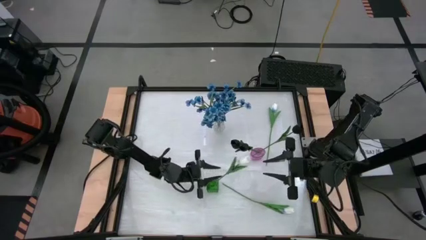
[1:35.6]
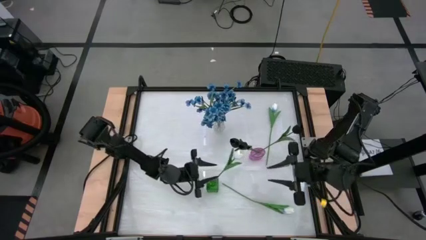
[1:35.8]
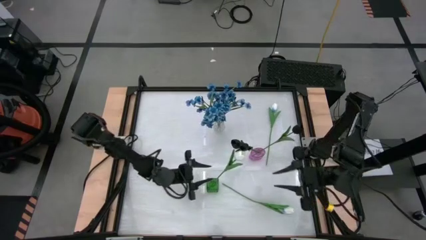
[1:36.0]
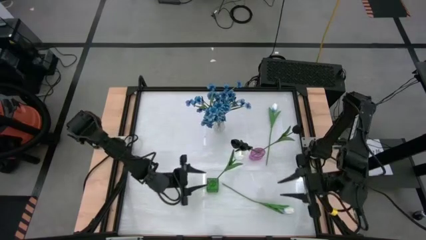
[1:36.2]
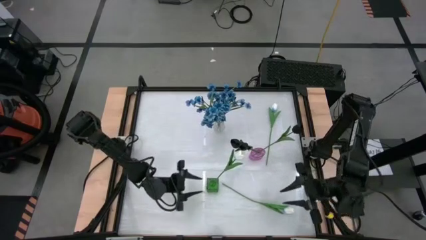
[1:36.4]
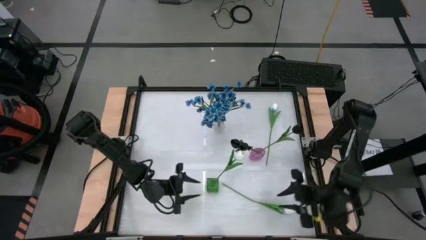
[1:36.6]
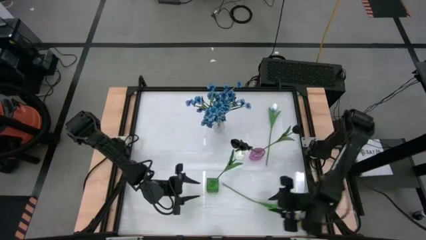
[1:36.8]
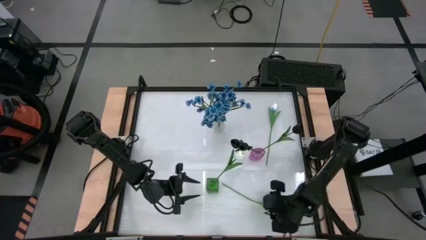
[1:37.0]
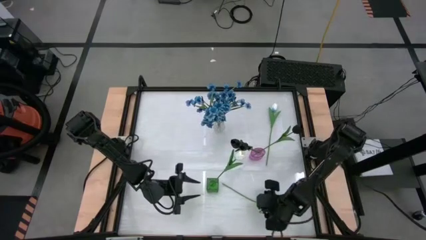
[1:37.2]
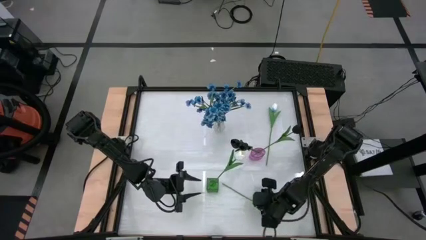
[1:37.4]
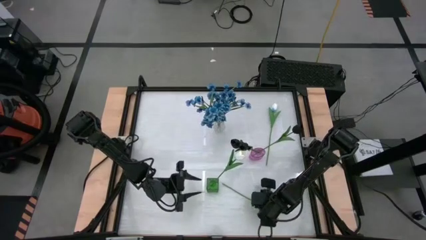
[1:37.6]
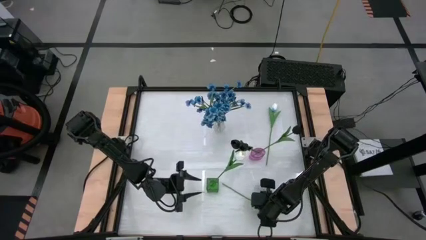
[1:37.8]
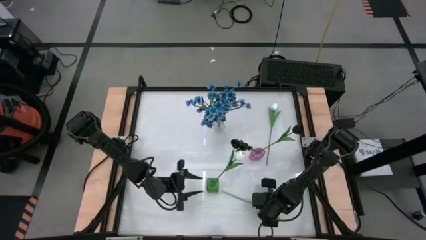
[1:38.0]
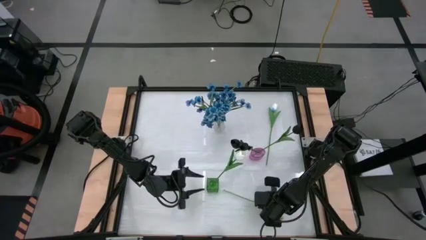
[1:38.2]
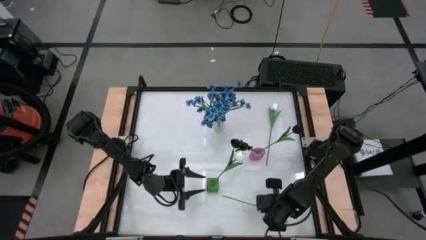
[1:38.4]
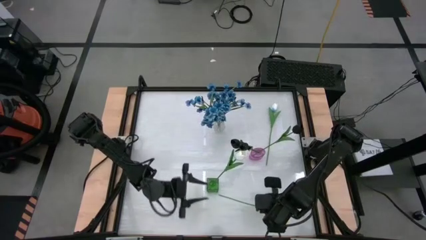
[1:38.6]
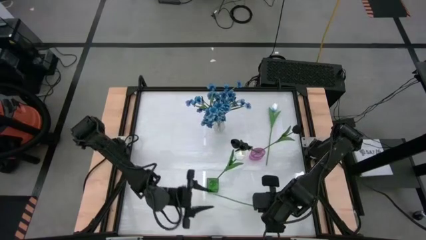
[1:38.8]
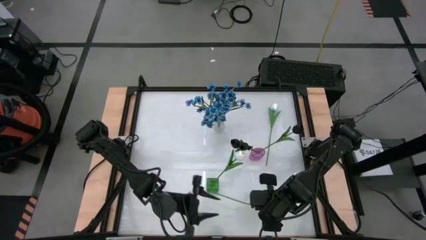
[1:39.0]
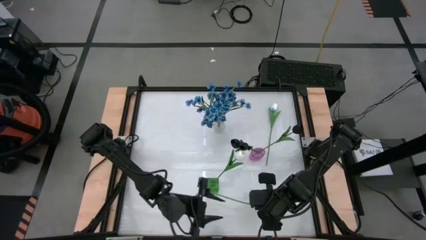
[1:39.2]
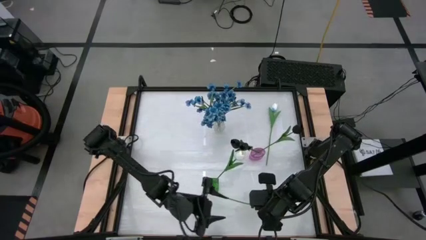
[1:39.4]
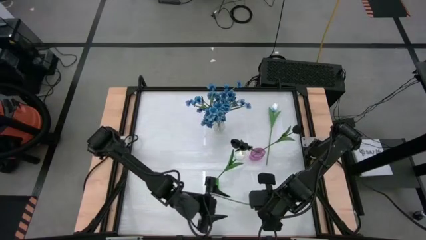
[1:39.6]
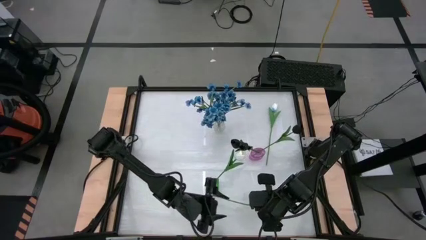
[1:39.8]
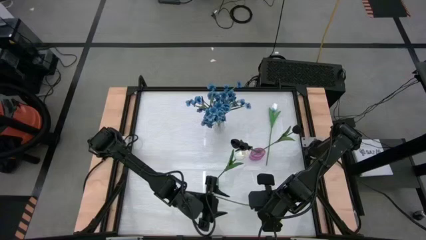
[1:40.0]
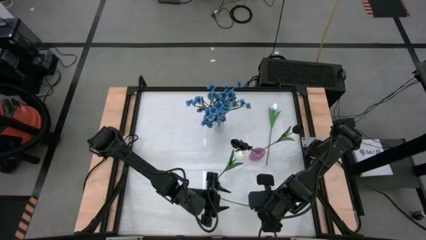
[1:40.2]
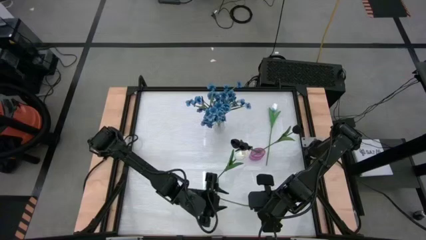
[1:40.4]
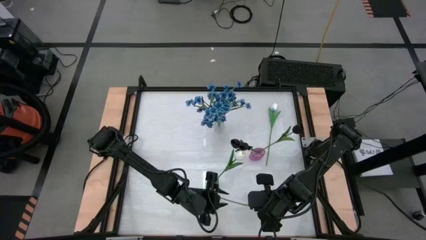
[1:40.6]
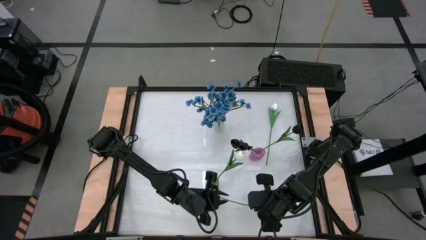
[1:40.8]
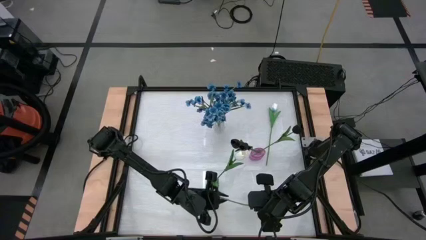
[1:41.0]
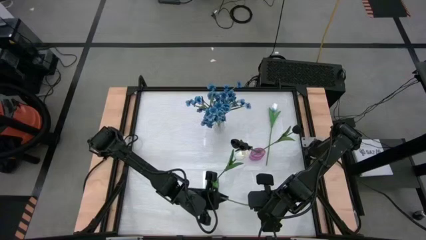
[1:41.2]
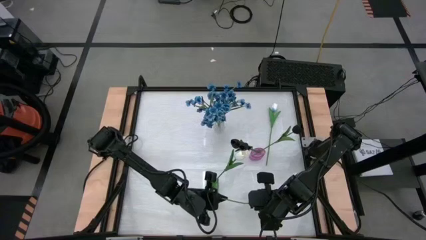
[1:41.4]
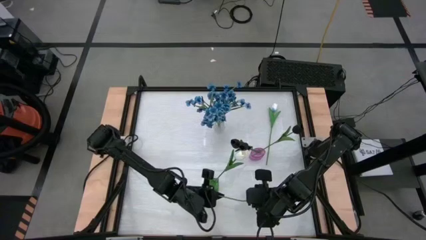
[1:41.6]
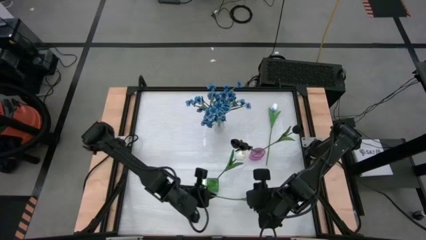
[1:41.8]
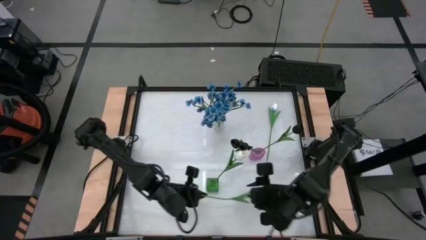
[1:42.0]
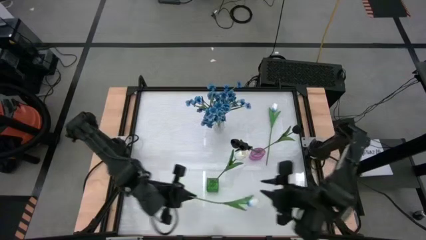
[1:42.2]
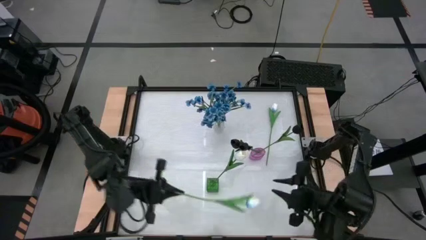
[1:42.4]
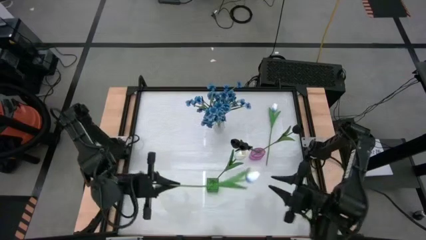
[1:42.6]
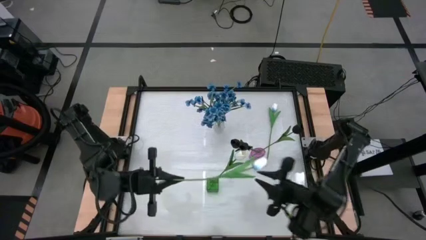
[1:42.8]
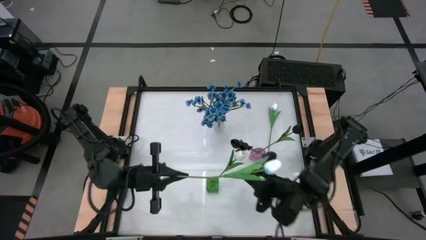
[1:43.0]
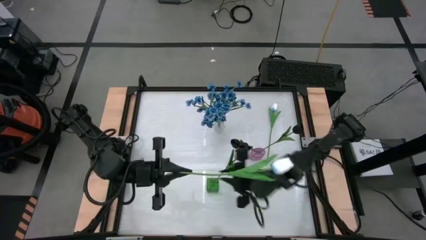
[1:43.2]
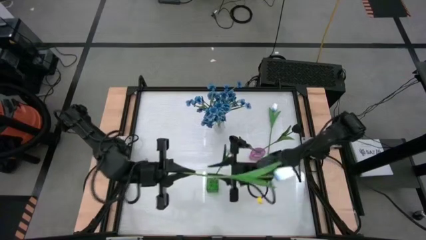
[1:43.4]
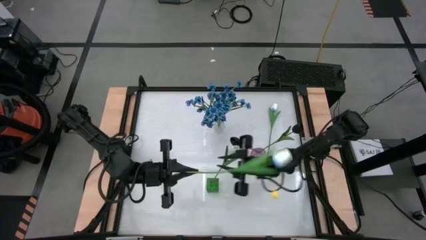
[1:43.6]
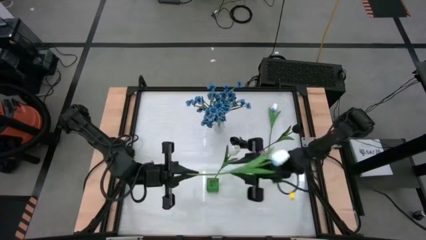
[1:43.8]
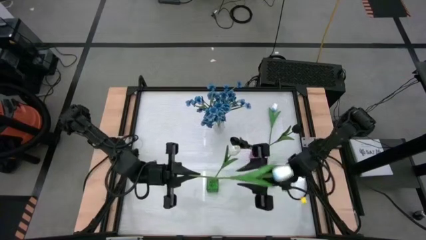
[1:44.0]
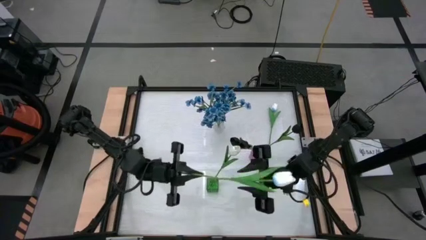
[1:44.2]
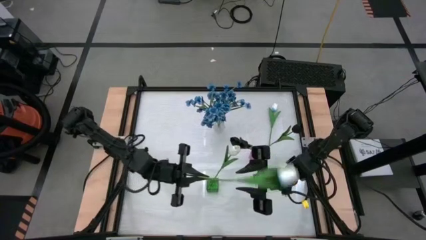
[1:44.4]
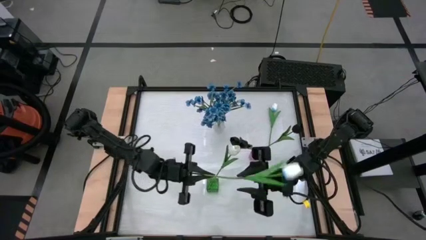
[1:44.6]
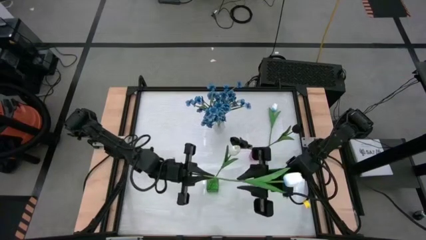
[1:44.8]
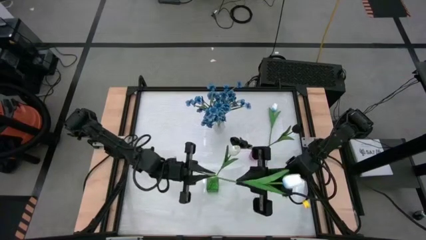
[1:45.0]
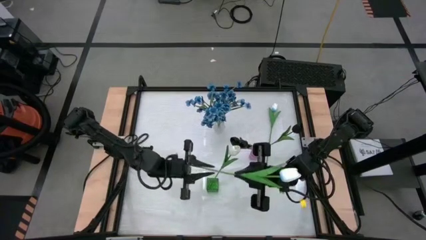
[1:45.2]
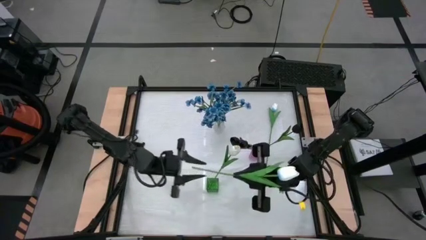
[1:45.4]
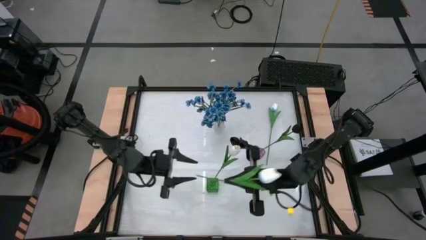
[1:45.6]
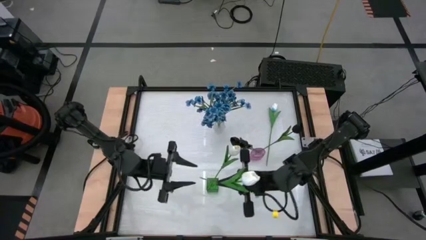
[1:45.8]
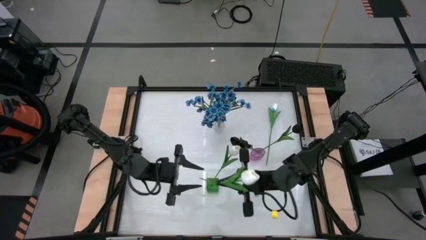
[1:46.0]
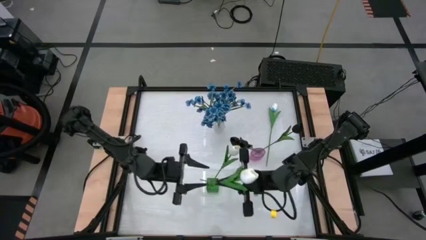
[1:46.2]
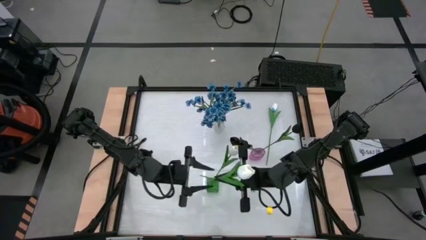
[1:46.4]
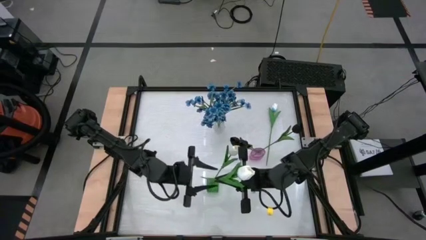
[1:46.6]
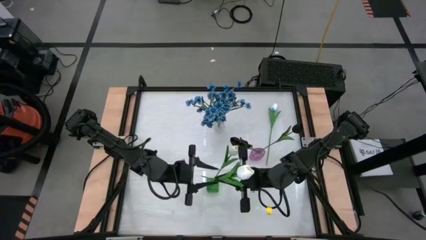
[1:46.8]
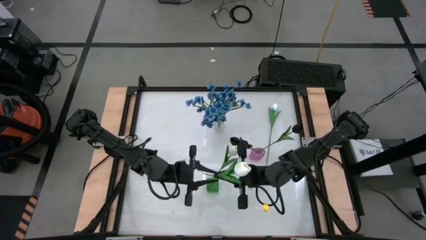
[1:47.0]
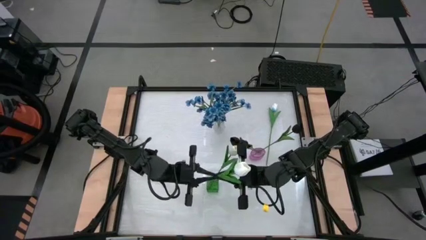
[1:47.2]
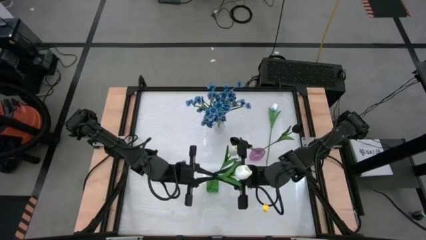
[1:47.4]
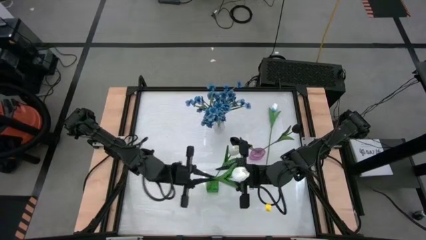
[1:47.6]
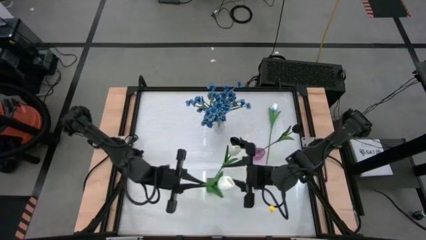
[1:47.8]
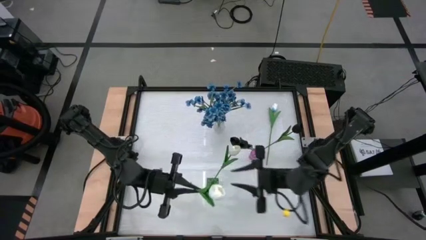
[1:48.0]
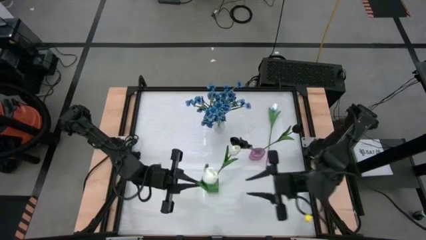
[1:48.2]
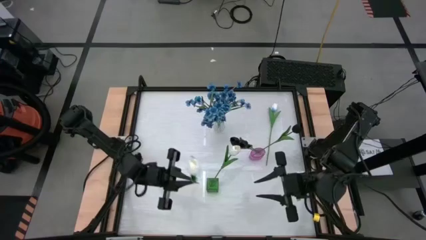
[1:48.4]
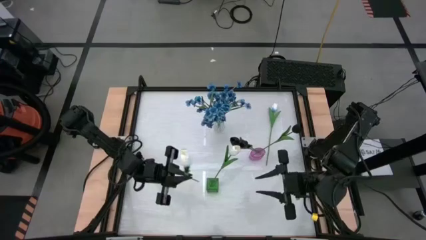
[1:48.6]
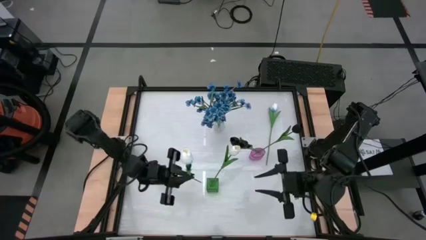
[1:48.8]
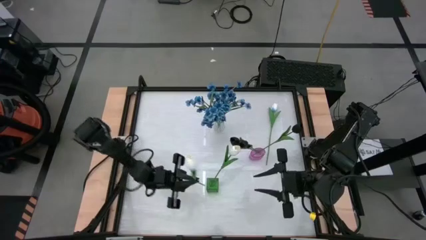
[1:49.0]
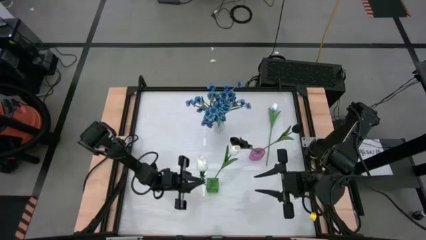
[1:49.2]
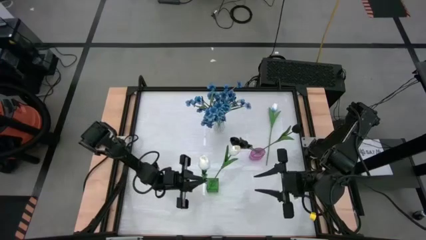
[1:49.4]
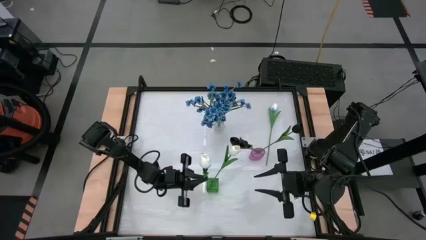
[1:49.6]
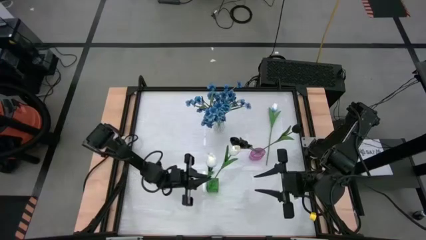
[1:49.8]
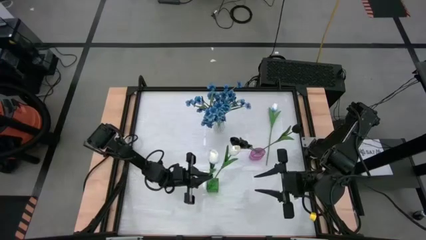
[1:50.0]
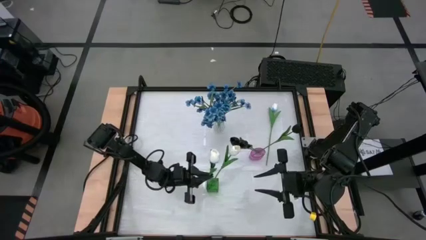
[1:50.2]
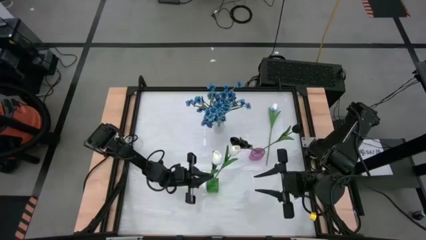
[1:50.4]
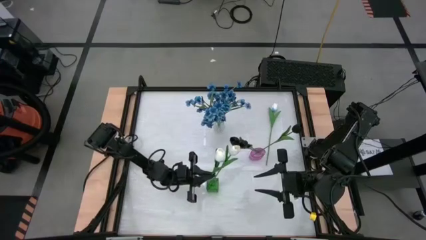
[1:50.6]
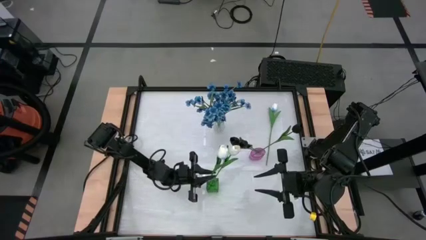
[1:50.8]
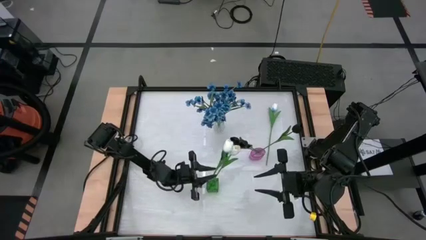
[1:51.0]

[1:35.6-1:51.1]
Task: Sort flowers into vase by color
Put the bottom white tulip into the green vase

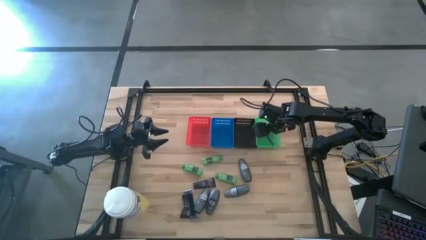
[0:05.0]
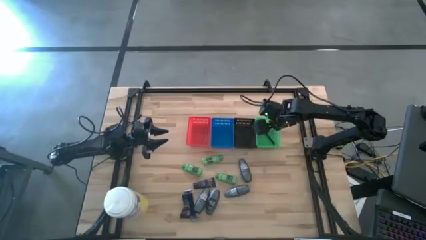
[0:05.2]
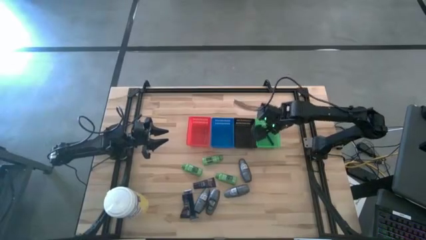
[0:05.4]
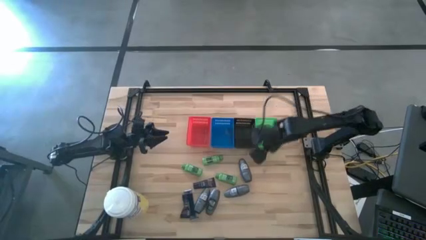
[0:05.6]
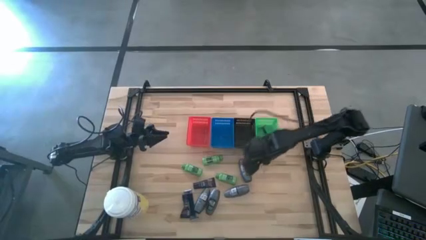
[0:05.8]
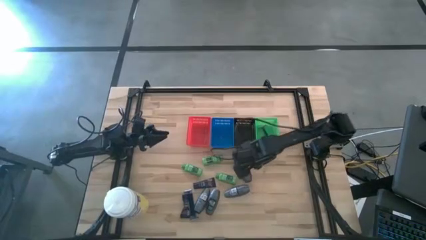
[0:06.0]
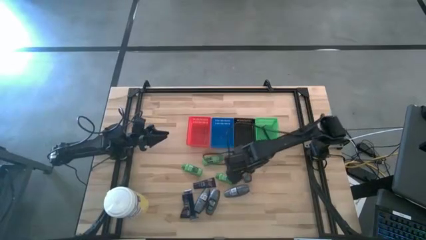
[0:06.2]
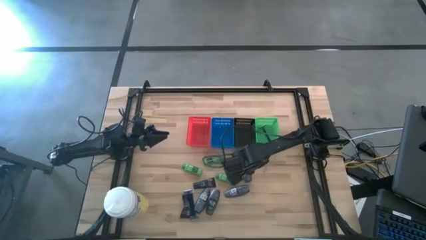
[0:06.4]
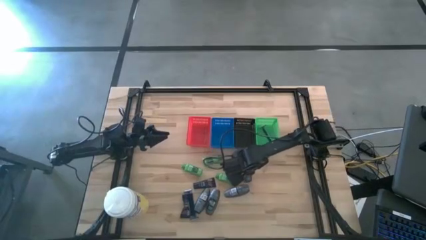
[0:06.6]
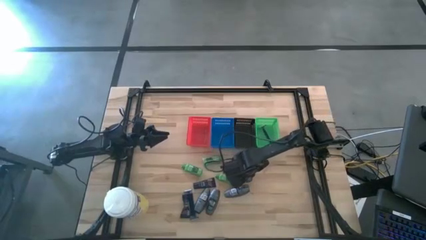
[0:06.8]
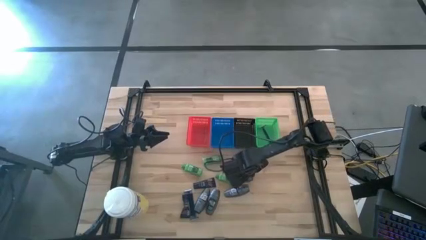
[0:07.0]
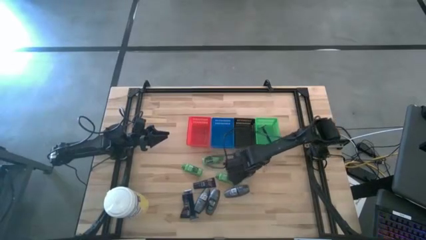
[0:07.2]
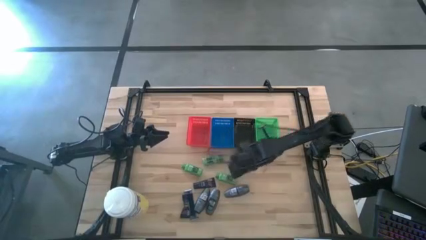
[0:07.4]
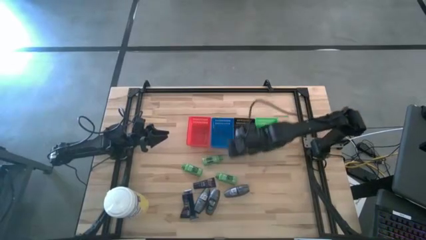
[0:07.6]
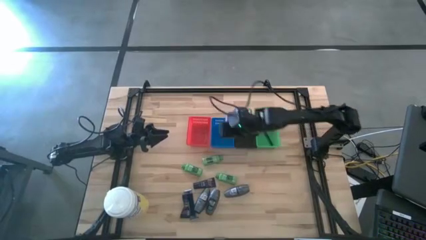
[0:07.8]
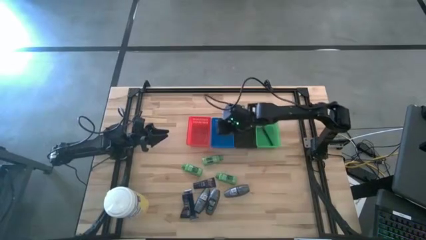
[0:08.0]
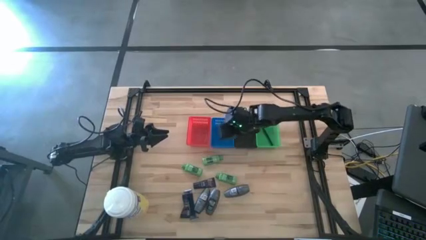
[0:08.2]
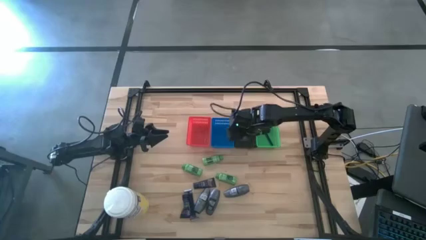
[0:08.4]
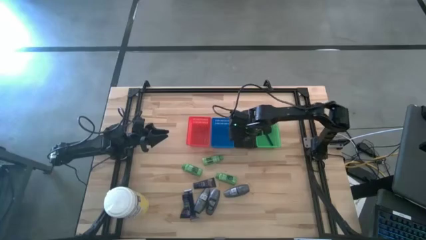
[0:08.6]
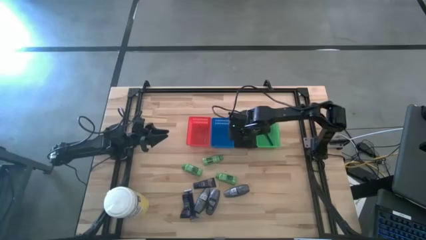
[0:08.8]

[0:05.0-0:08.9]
Task: Pick & Place Travel size toiletries
Put the gray deodorant into the black bin
